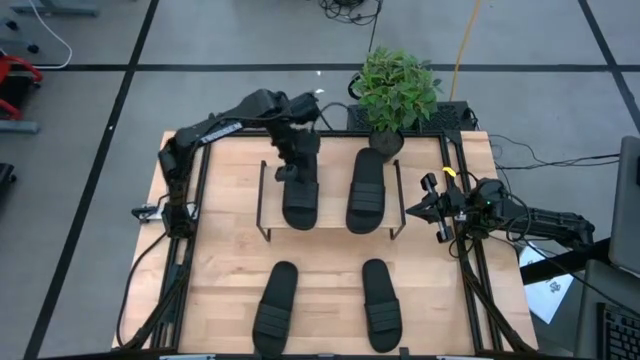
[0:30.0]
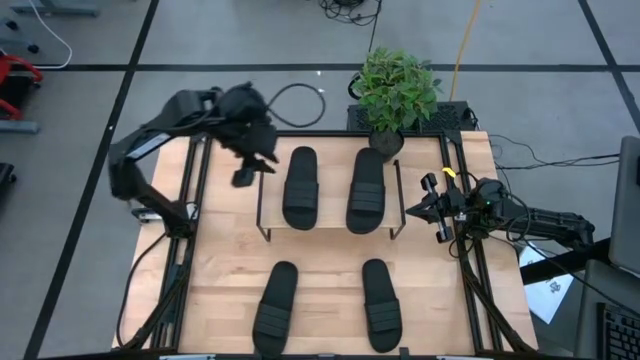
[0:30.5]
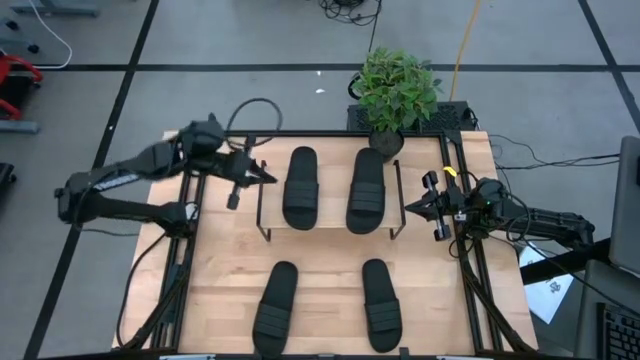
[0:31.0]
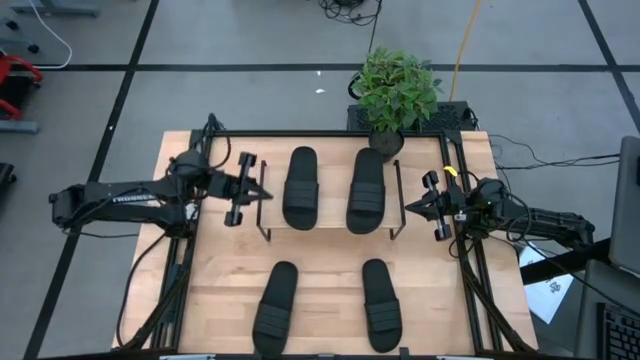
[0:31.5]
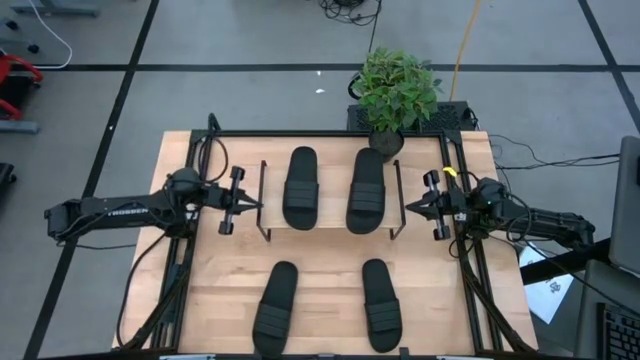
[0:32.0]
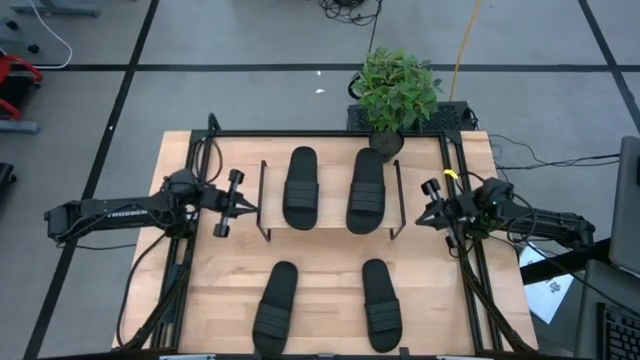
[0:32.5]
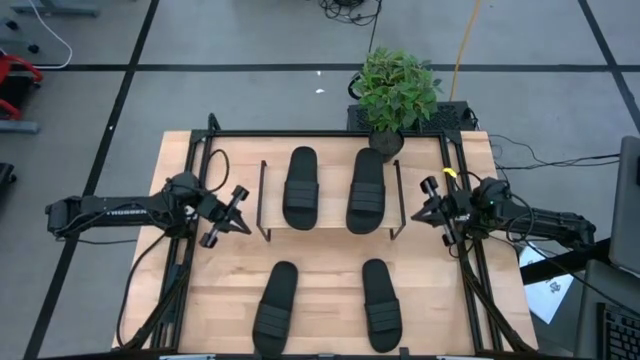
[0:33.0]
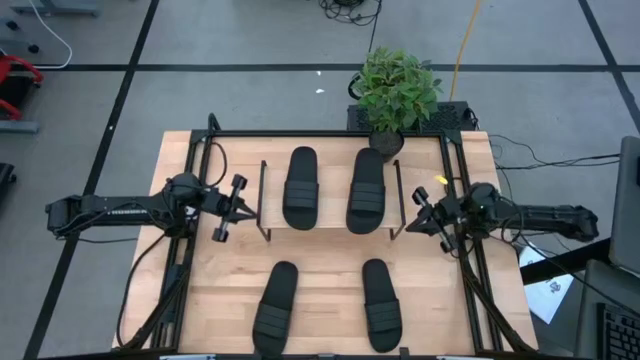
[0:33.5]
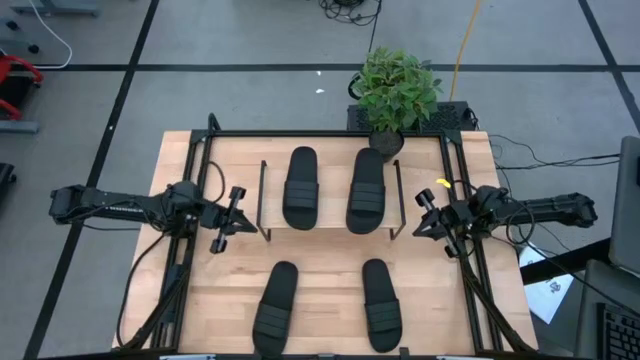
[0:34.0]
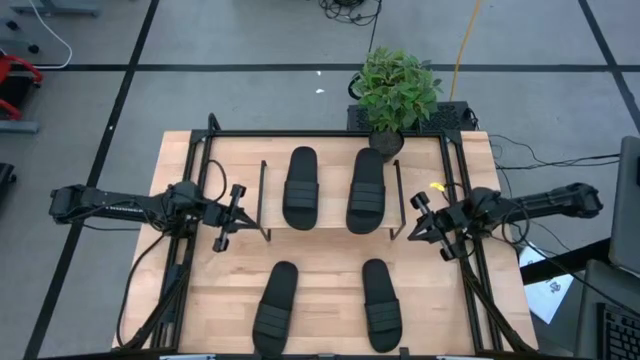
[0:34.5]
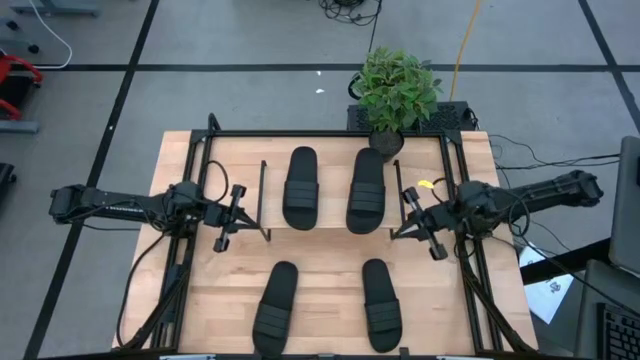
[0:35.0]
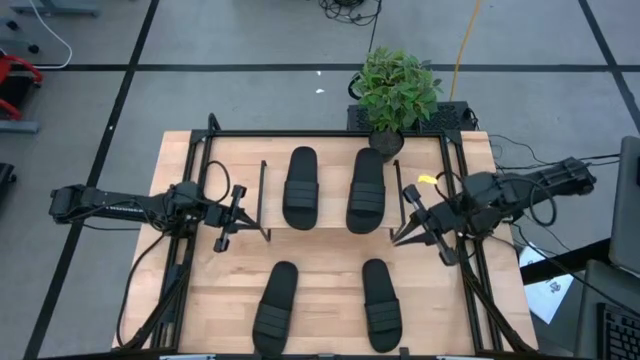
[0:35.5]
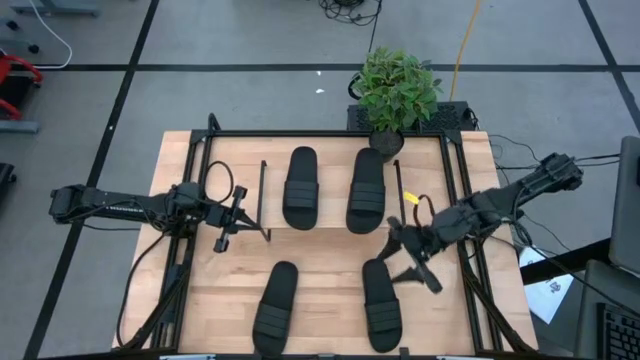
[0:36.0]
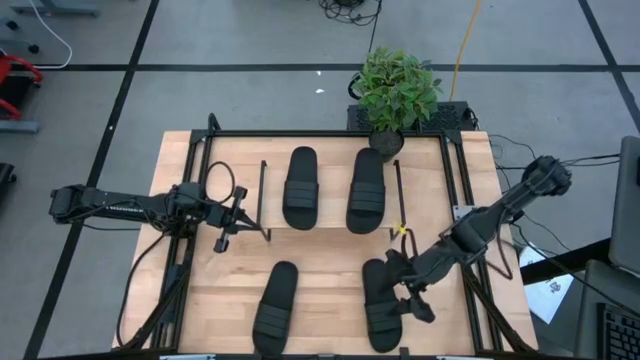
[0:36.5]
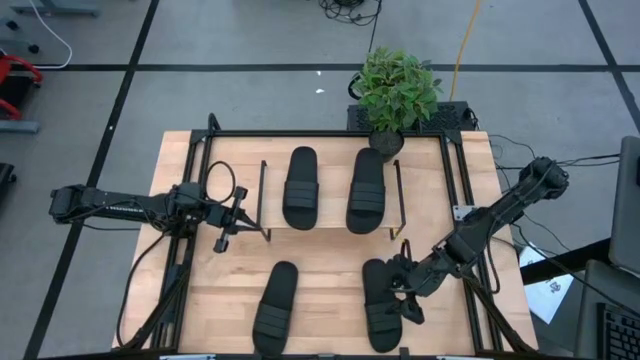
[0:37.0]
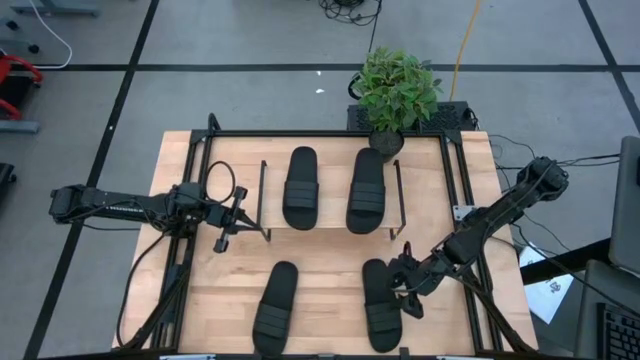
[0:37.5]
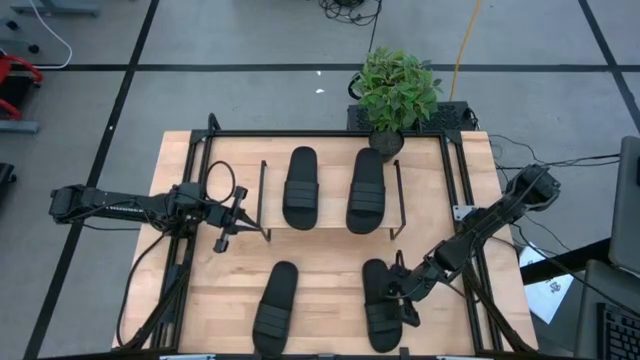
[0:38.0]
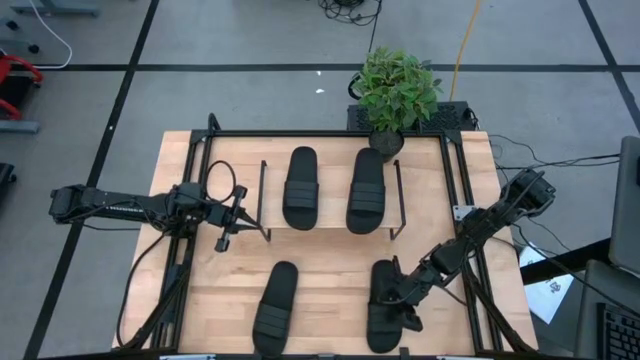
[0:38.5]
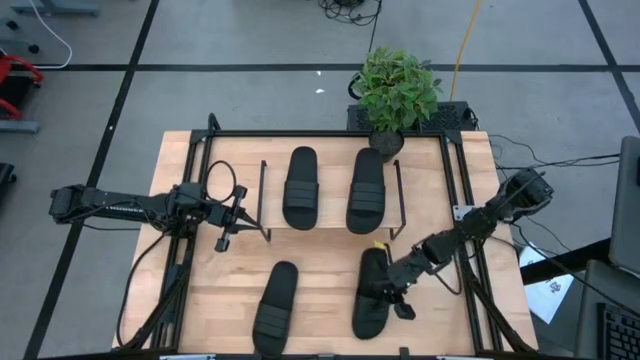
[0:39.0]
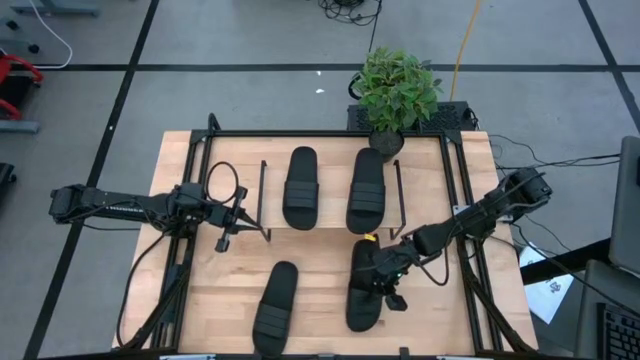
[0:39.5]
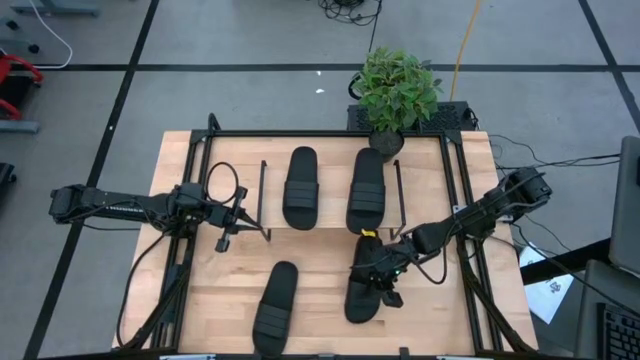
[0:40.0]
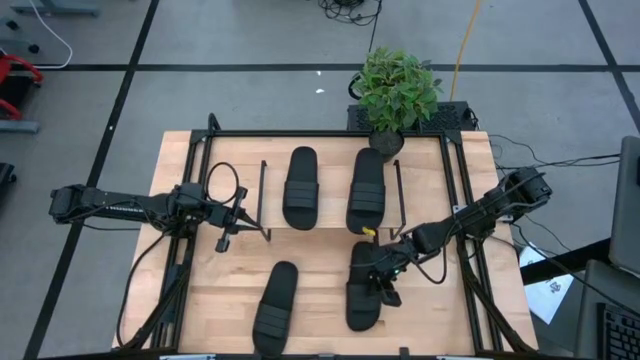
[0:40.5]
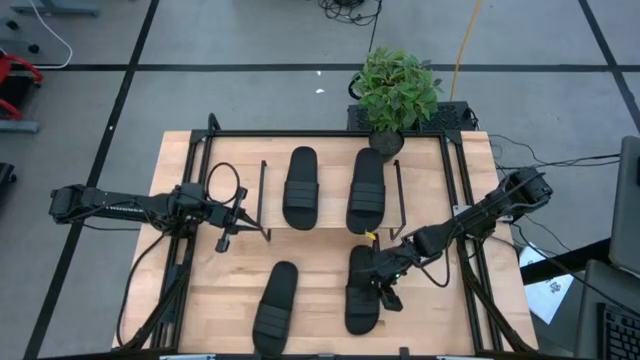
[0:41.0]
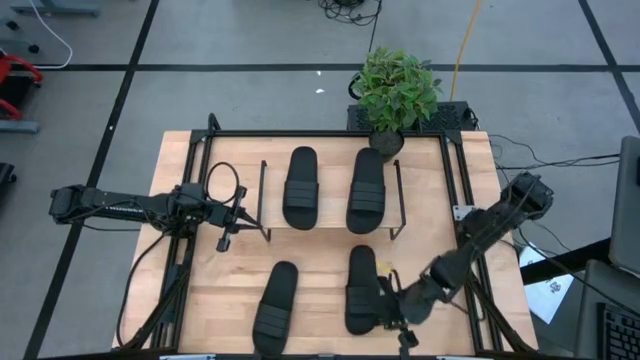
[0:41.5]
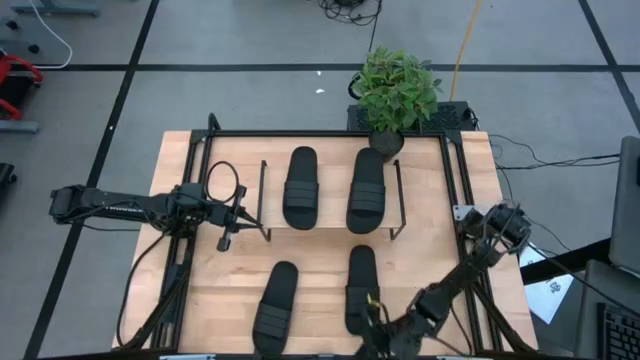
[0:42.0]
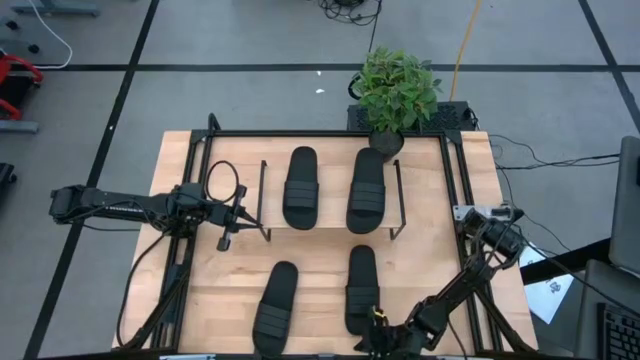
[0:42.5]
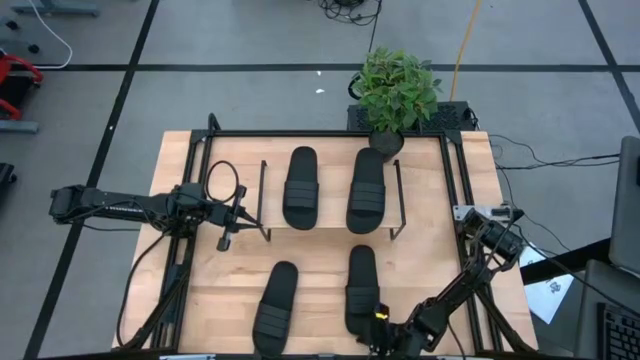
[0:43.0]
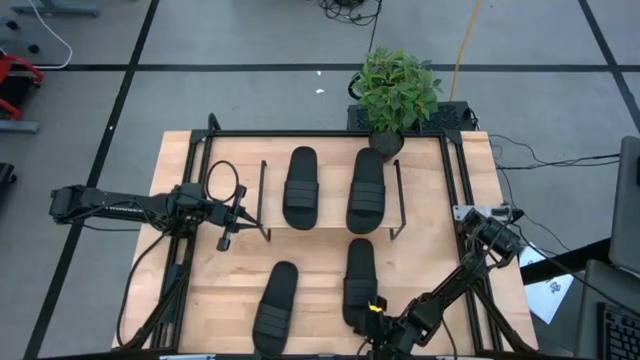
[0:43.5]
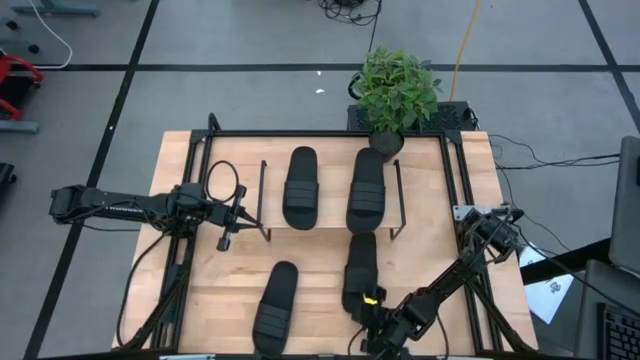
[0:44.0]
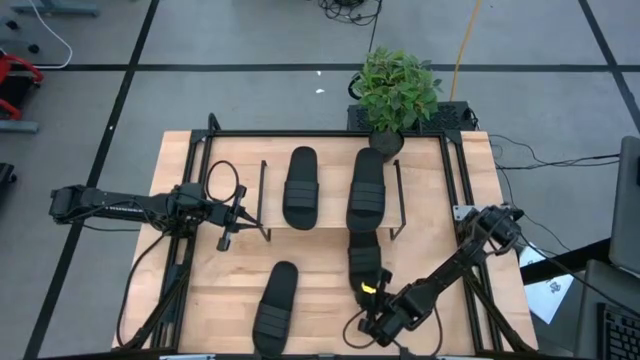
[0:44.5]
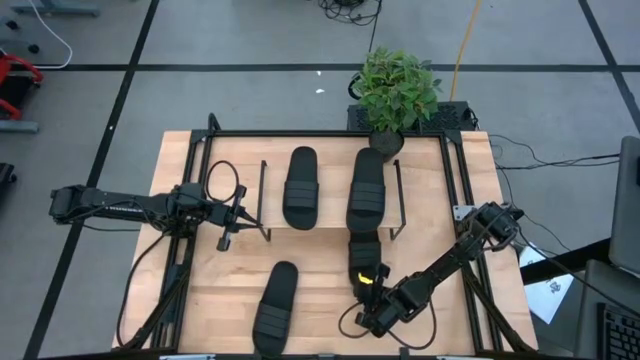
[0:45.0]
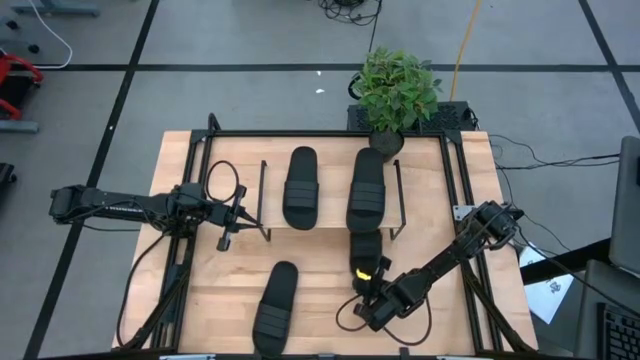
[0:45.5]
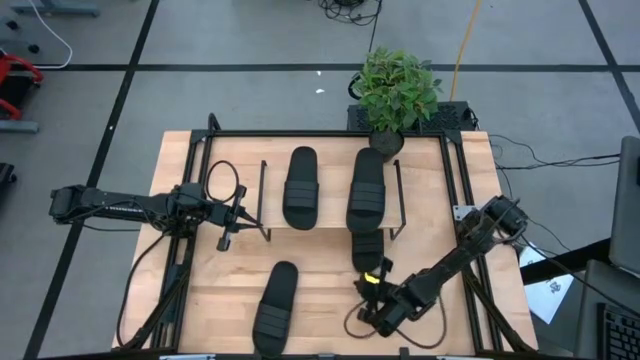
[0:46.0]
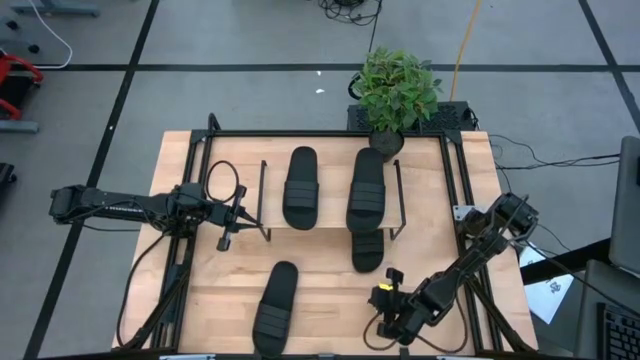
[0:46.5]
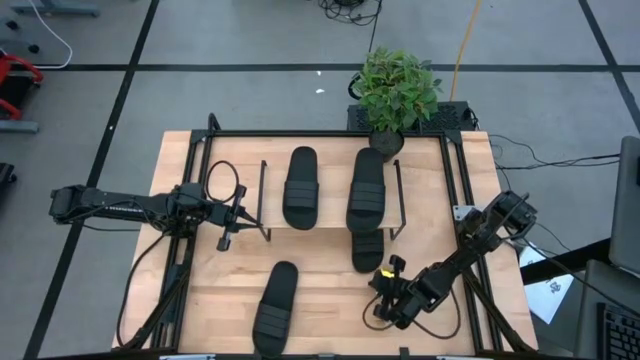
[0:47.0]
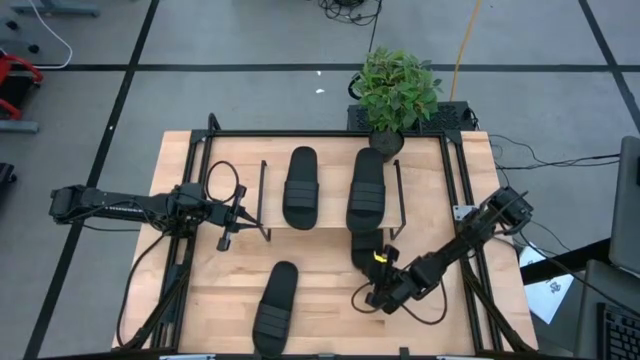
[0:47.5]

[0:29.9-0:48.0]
Task: Pick and place slides into the shelf
Put the right black slide under the shelf

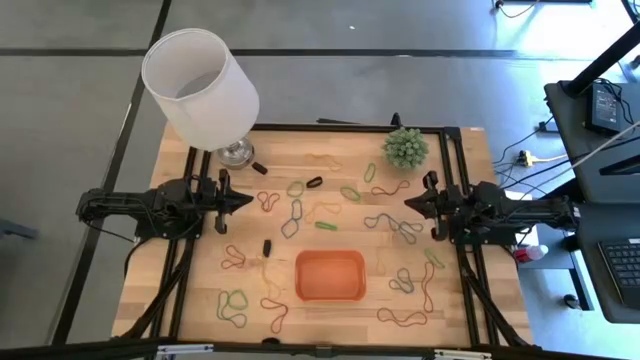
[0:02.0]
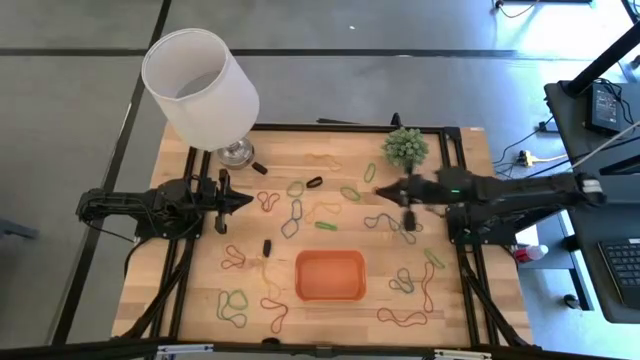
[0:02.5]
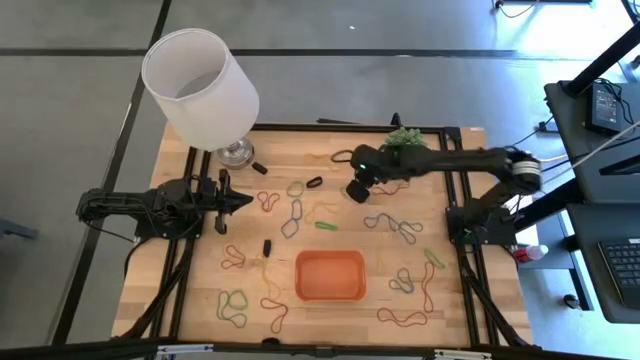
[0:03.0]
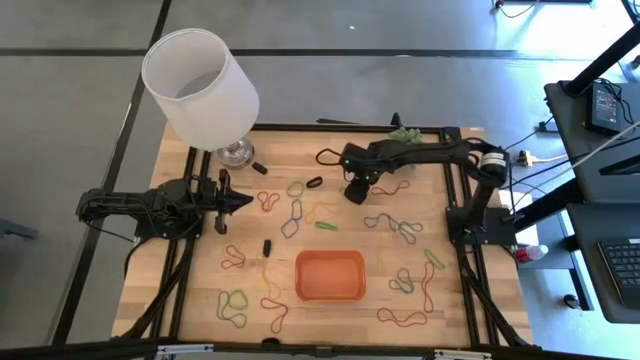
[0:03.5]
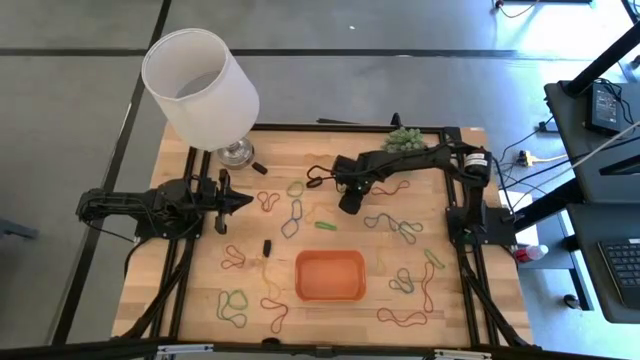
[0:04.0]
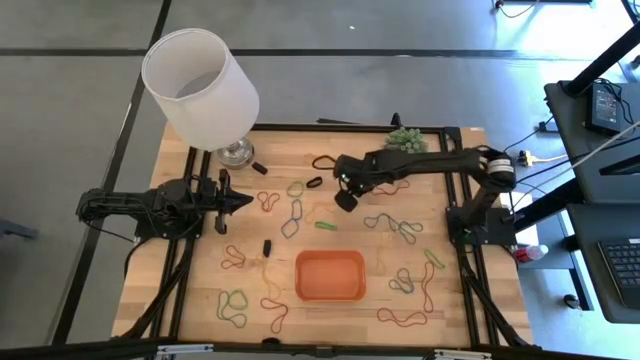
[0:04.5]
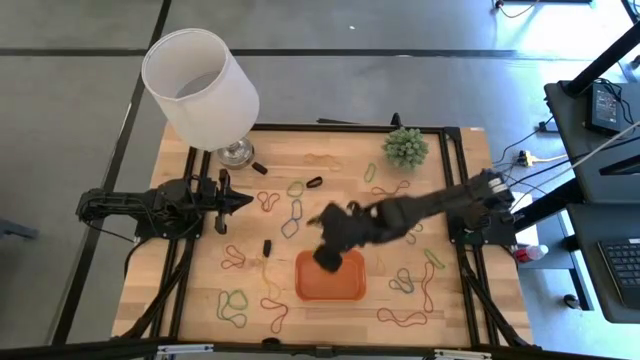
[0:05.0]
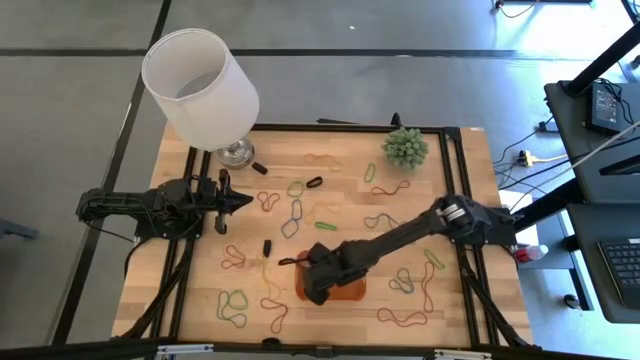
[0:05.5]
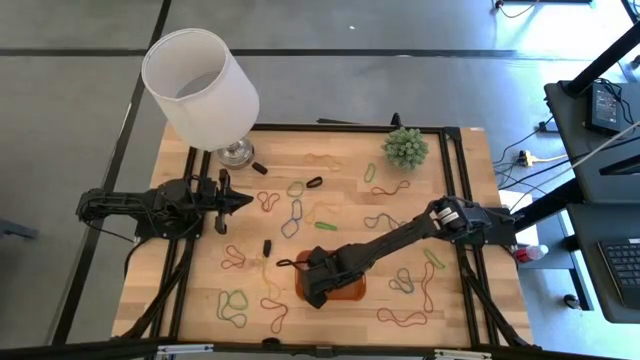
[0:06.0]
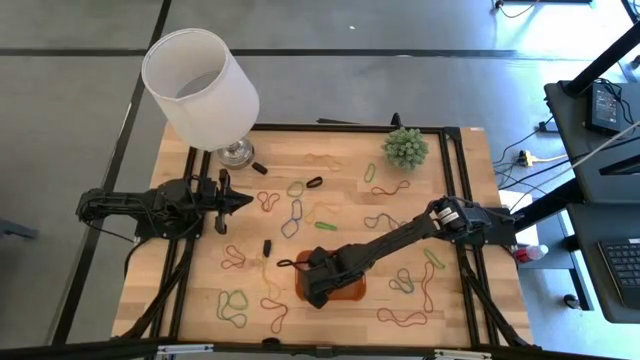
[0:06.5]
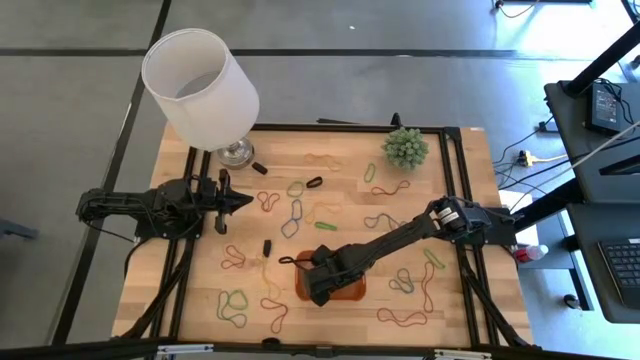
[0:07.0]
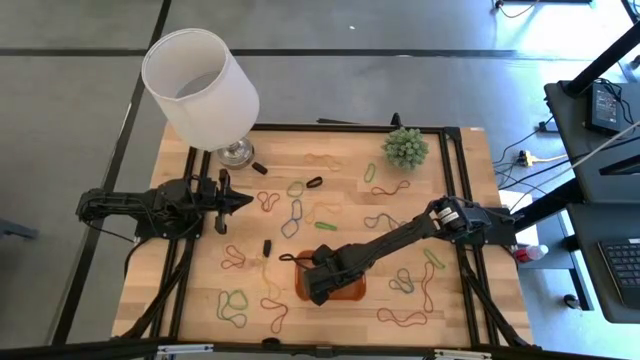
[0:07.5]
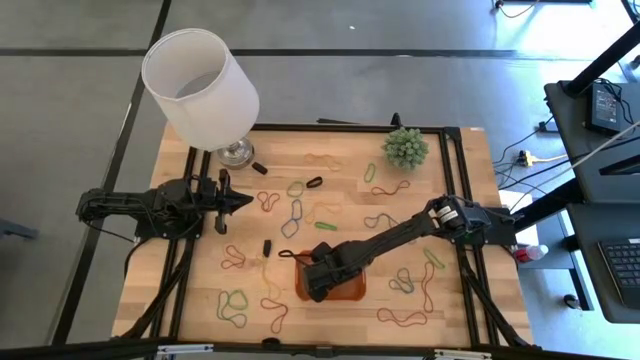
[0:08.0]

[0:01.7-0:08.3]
Task: Pick and place rubber bands into bin
Put the green rubber band into the orange bin
